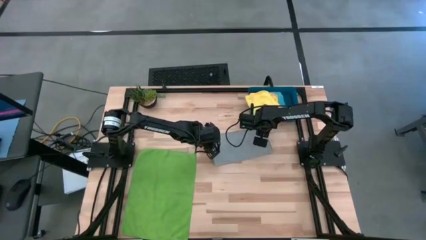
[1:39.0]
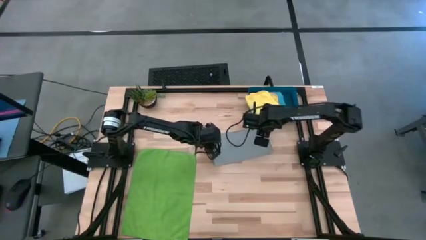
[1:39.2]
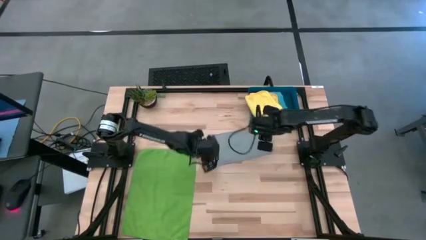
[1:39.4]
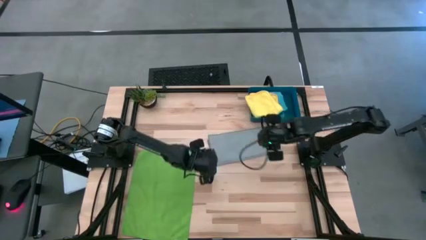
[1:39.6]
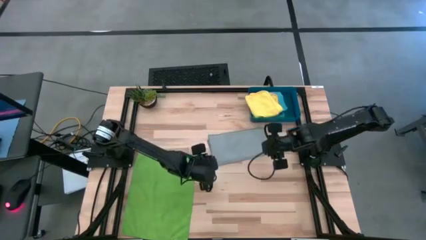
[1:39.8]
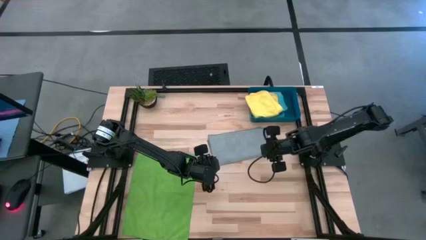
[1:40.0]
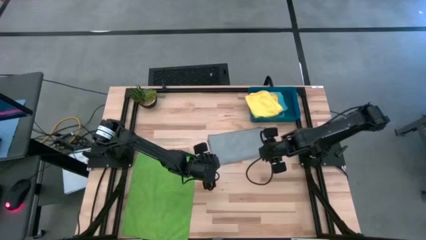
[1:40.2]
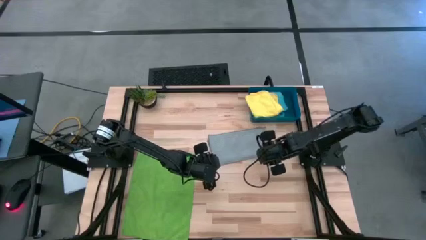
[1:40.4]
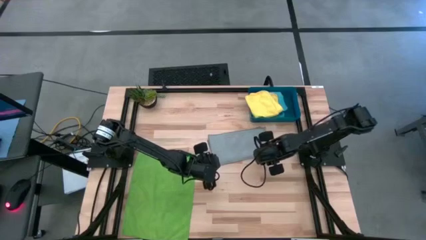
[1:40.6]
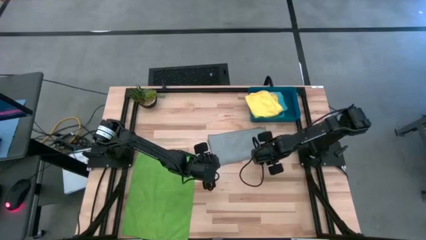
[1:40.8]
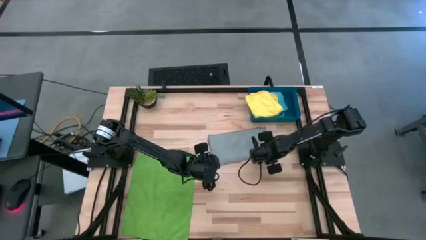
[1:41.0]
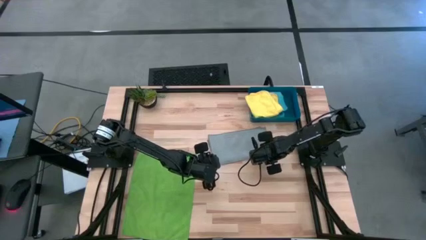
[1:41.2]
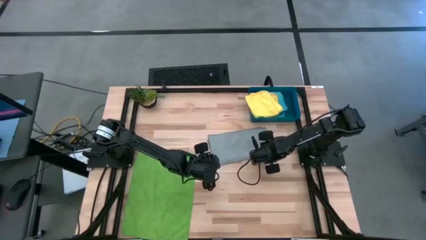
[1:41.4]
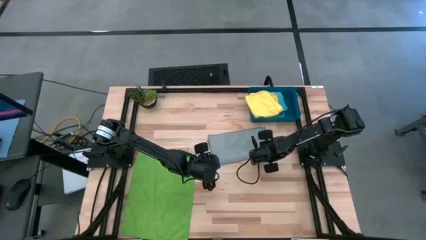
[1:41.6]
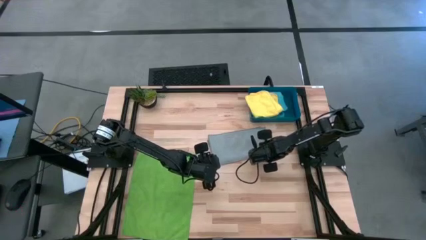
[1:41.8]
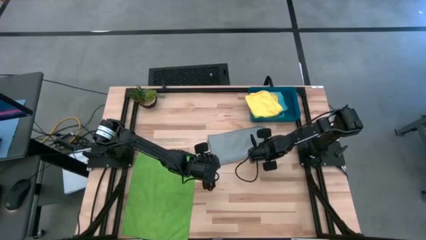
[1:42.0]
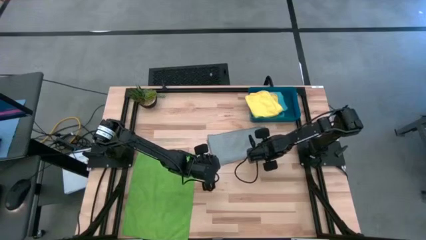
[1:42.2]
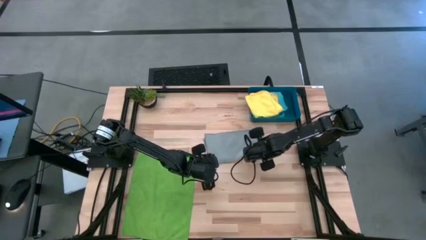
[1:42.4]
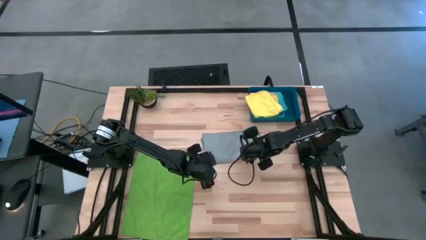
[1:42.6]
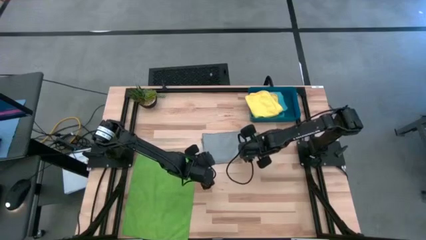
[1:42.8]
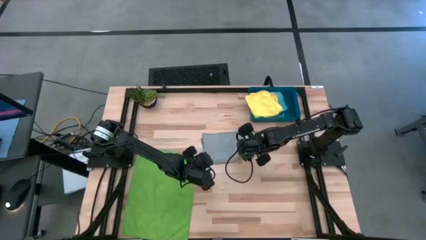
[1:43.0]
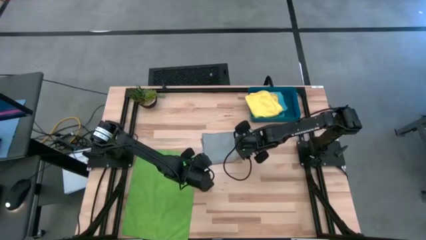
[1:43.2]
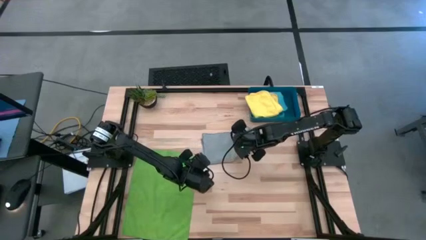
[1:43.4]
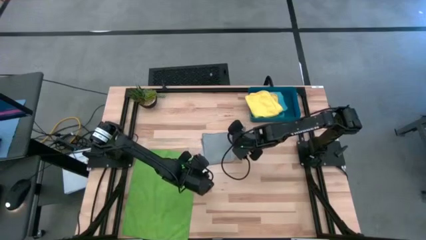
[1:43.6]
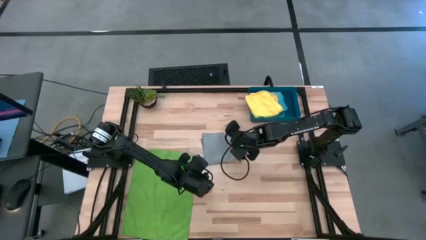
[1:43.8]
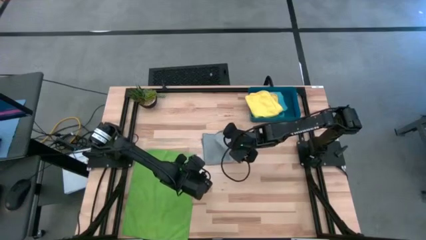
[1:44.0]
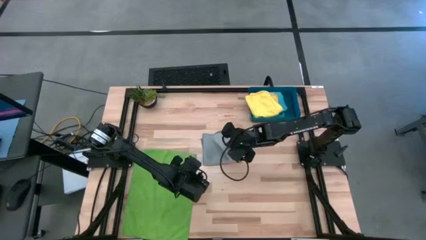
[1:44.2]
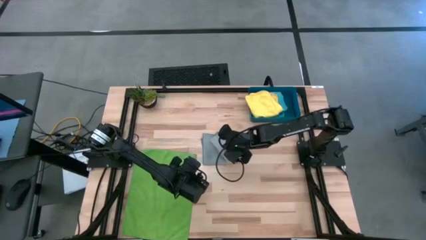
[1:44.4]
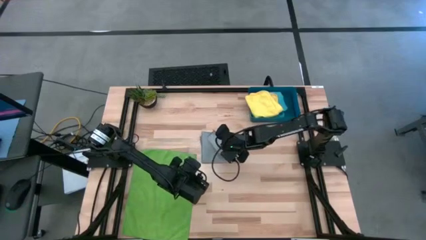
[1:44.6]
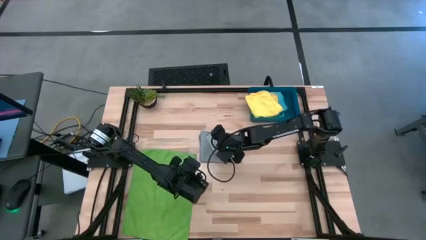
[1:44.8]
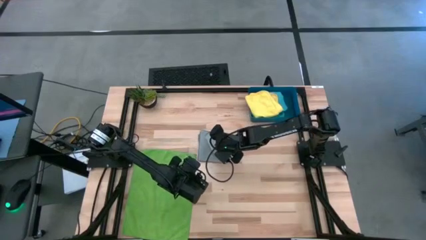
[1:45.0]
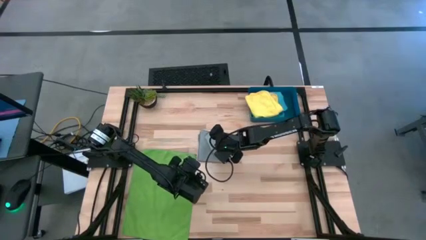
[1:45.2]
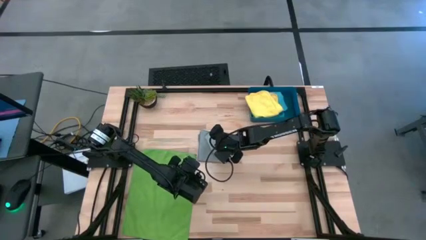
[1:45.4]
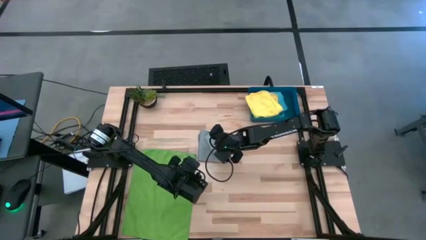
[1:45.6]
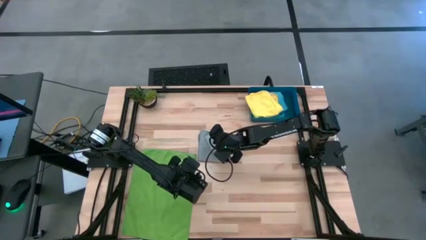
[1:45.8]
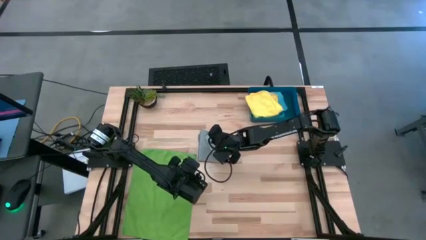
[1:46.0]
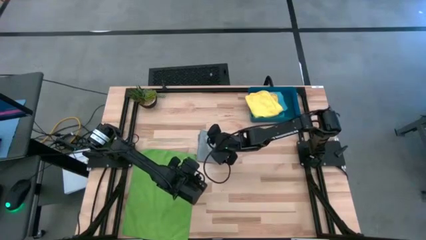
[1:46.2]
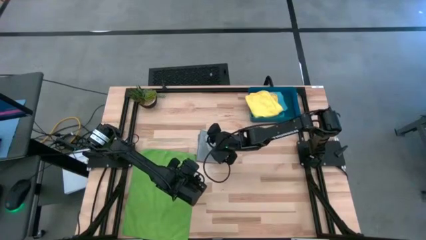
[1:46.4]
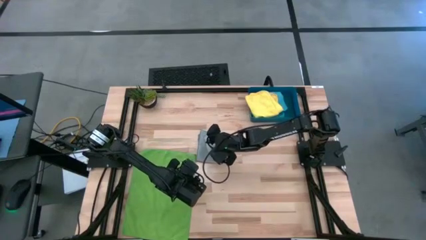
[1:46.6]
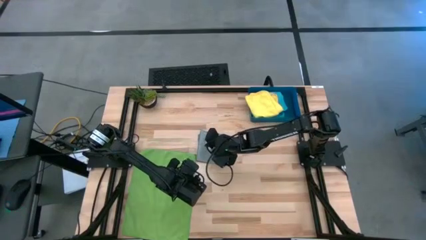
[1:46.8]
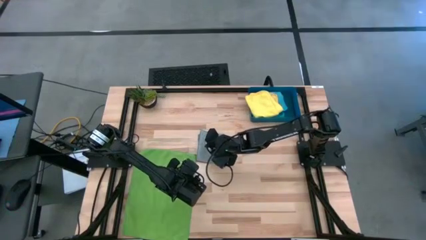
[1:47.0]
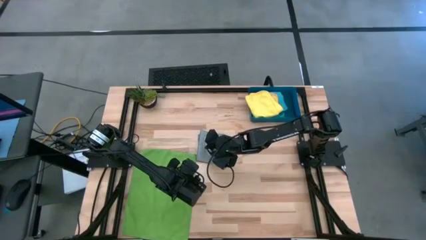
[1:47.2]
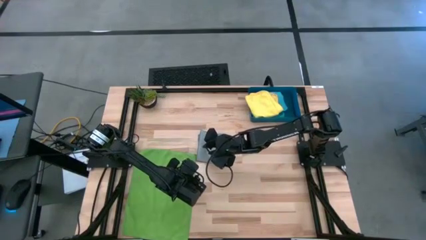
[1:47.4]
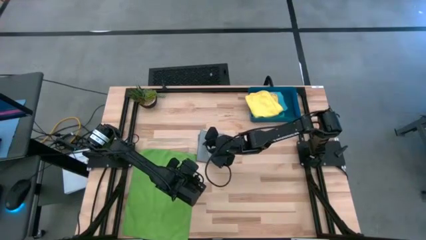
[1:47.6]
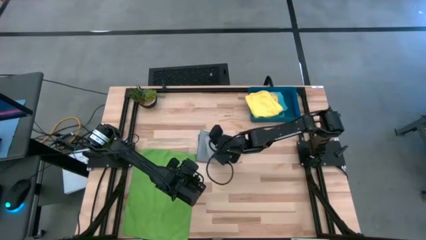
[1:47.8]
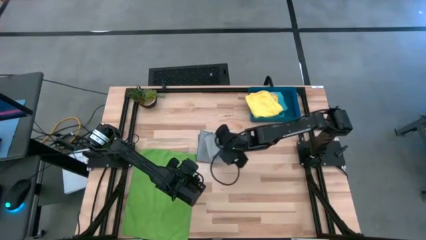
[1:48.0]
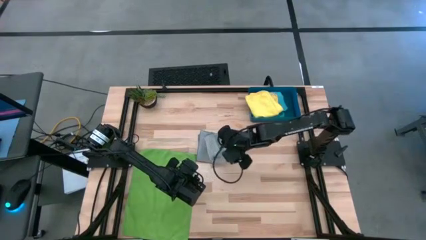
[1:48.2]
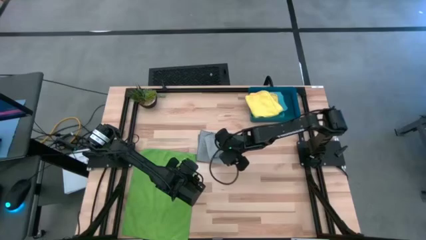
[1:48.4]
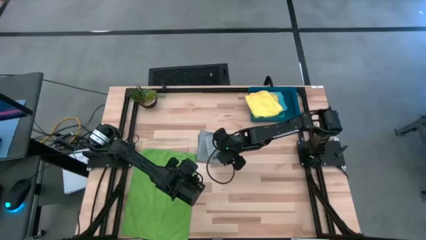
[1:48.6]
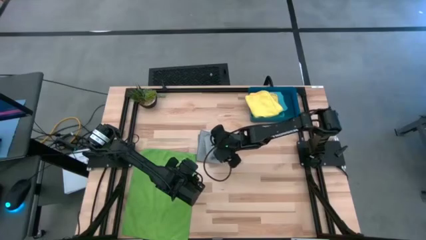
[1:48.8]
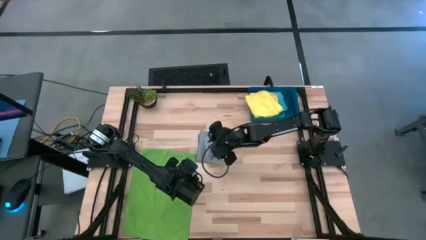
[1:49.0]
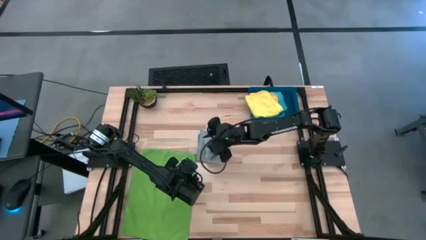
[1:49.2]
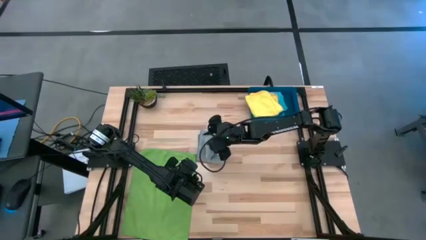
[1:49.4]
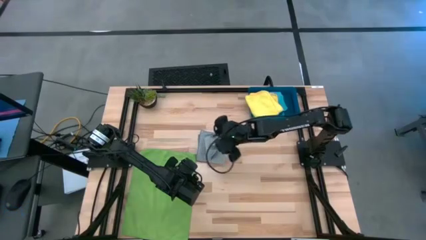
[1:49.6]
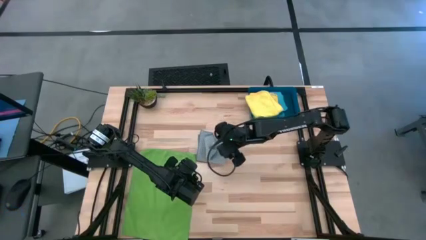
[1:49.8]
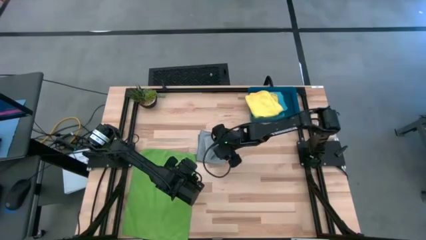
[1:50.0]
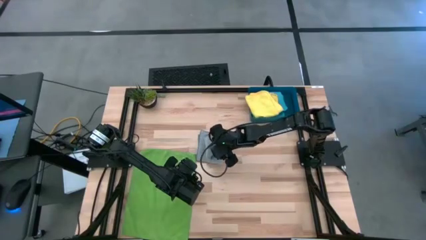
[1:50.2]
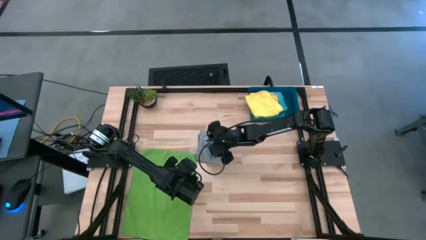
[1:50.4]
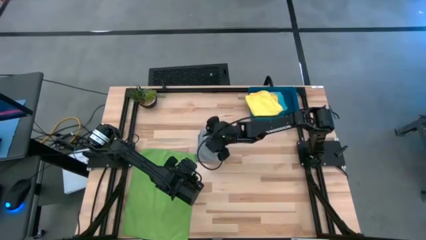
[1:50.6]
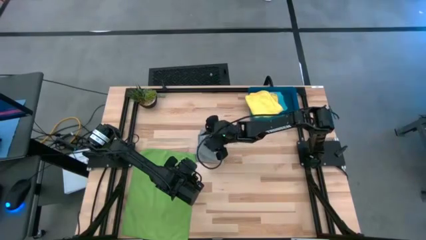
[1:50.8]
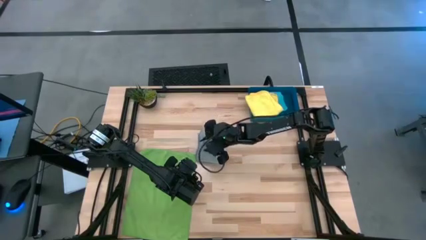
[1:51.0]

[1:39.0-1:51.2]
Task: Fold microfiber towels
Fold the gray microfiber cloth

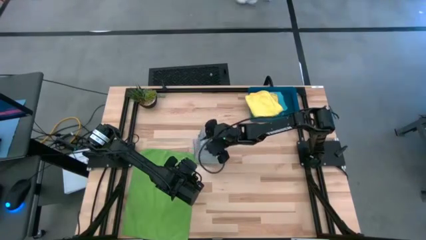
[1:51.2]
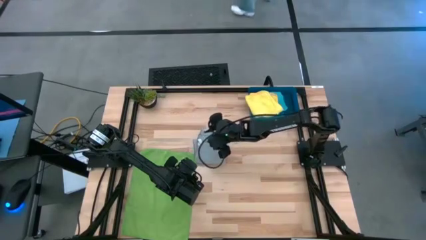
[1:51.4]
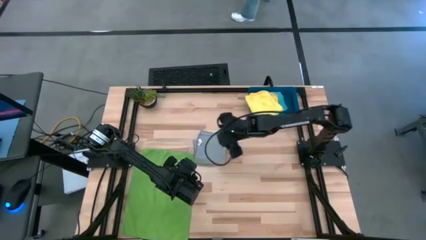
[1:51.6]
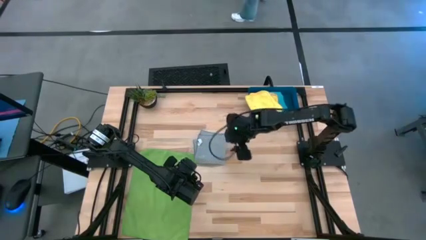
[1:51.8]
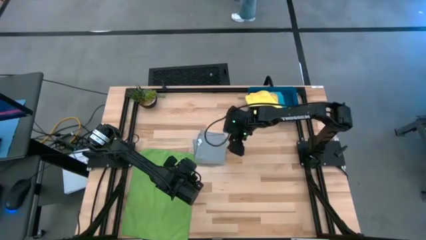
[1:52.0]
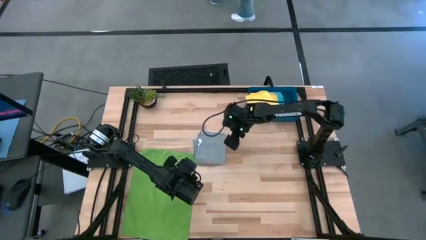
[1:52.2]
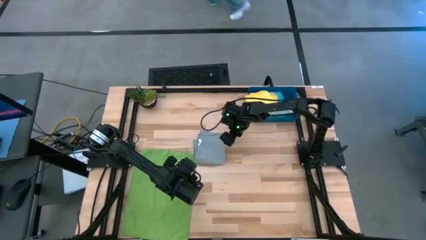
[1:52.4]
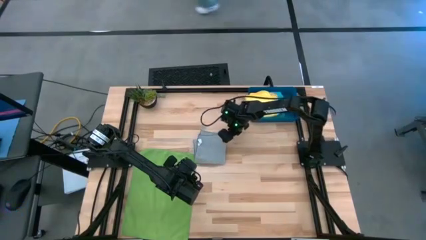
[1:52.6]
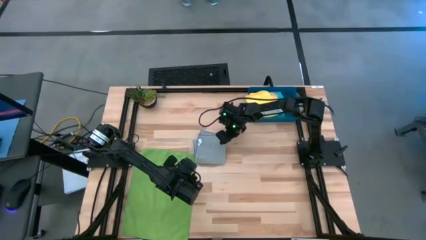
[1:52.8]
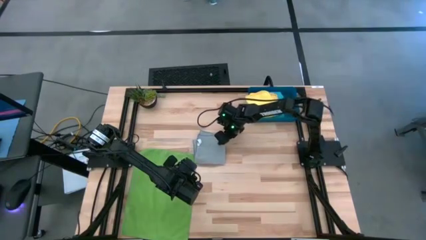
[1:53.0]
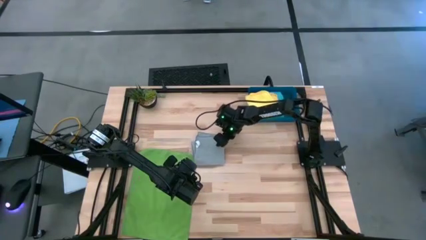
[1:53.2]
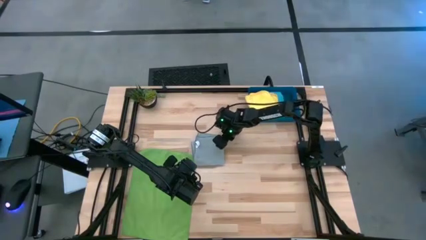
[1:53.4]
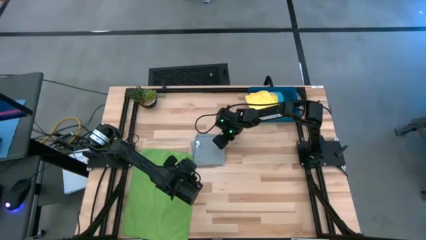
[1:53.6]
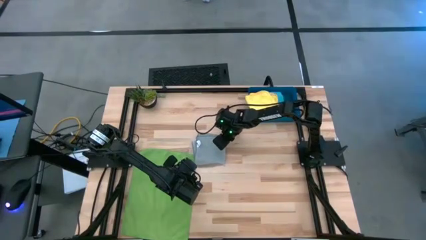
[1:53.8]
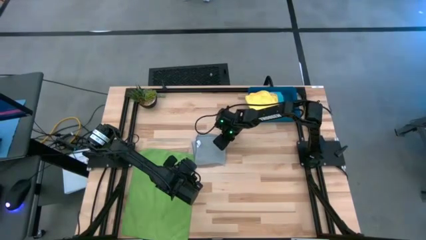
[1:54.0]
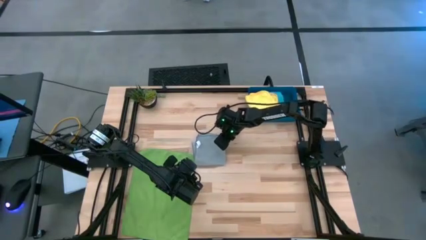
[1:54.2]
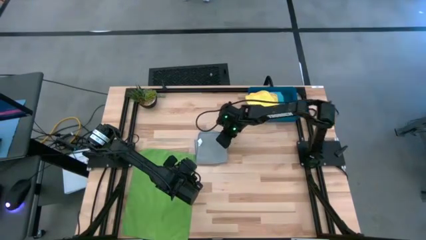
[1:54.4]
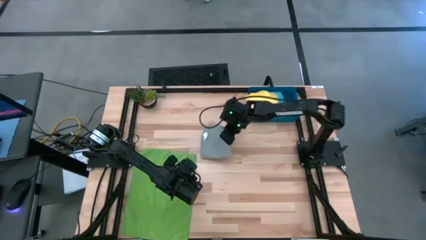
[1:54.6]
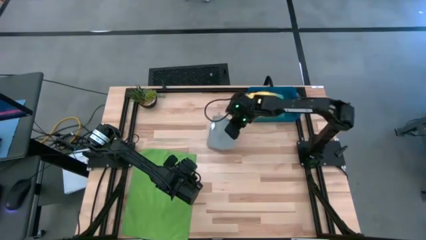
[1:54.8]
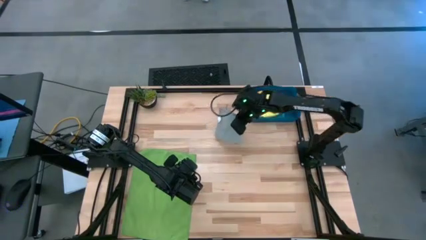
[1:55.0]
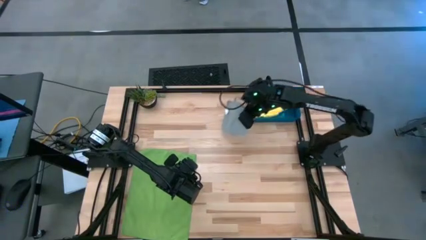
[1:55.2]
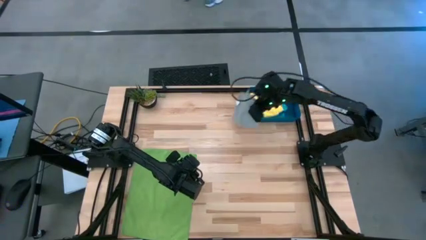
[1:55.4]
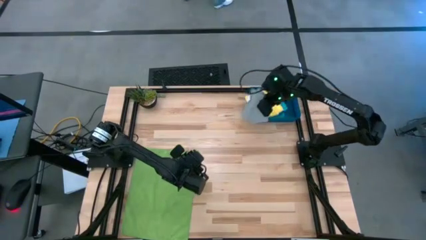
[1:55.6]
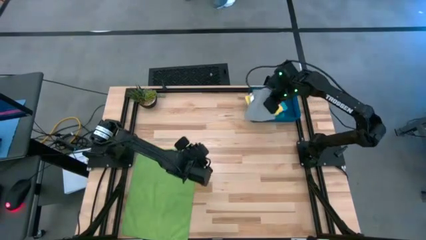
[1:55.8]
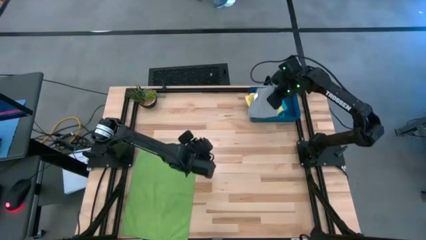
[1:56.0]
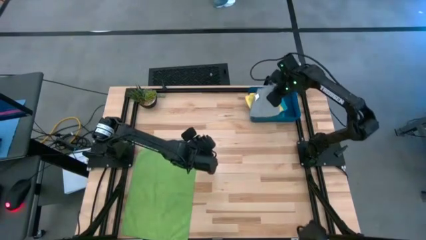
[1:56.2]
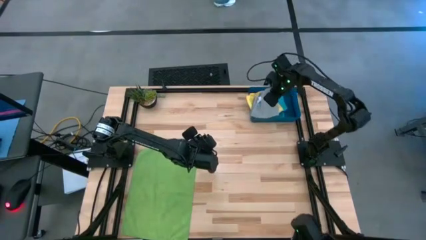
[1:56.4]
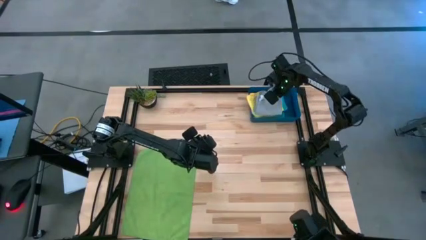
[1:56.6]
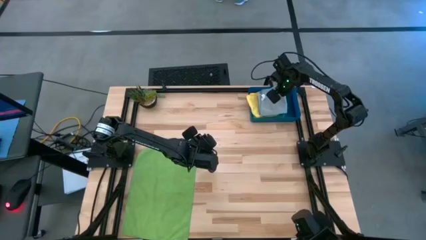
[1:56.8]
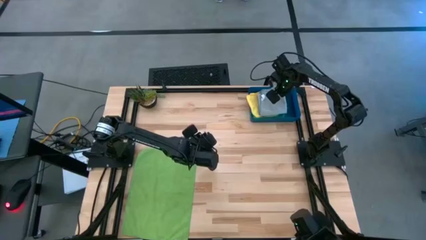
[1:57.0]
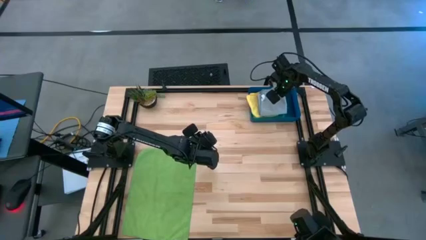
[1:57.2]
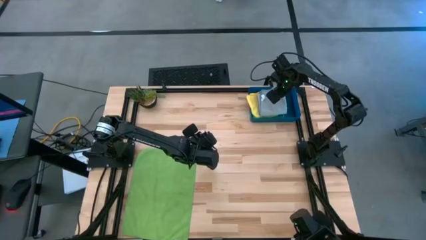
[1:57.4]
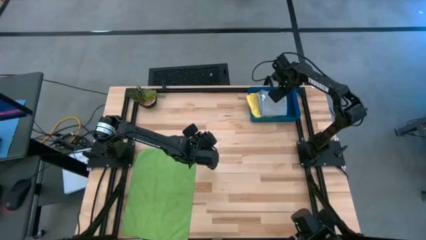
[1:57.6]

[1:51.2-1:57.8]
Stack the gray microfiber cloth on top of the yellow microfiber cloth in the blue bin
